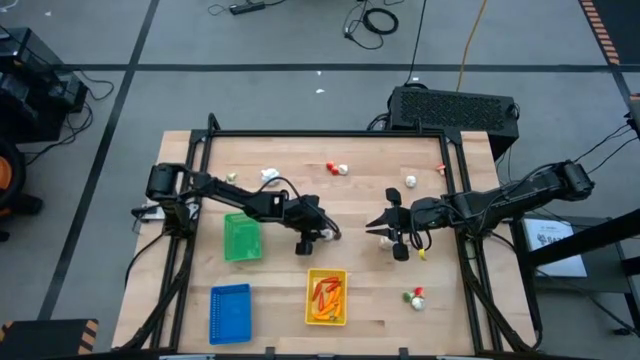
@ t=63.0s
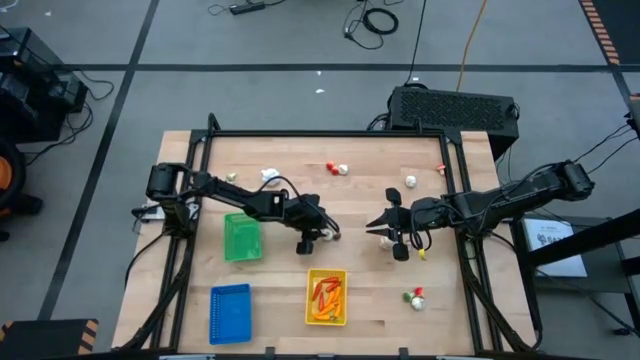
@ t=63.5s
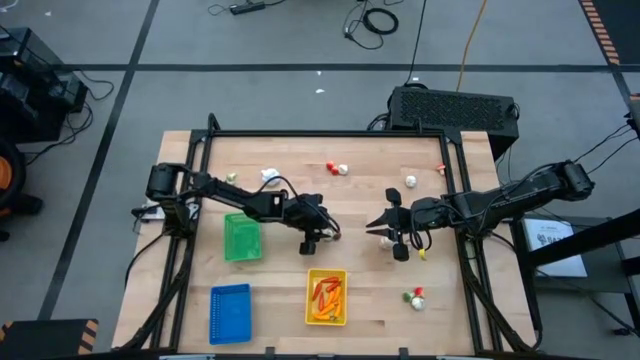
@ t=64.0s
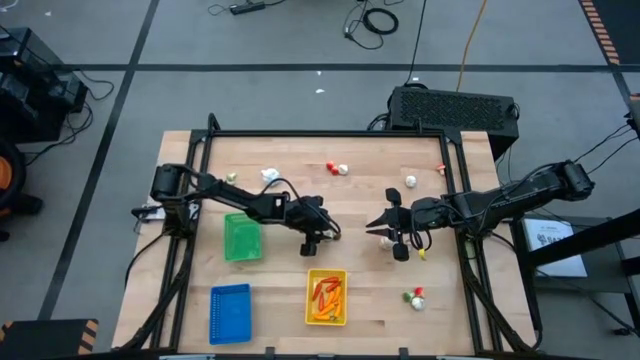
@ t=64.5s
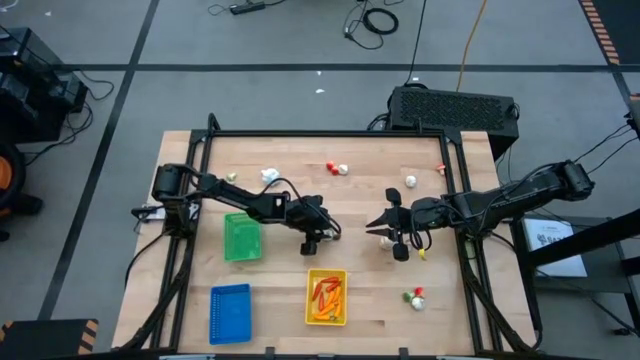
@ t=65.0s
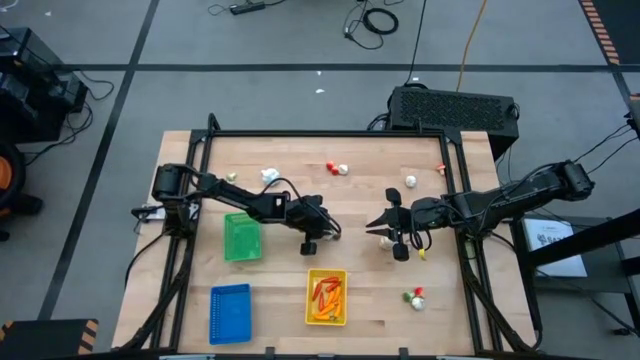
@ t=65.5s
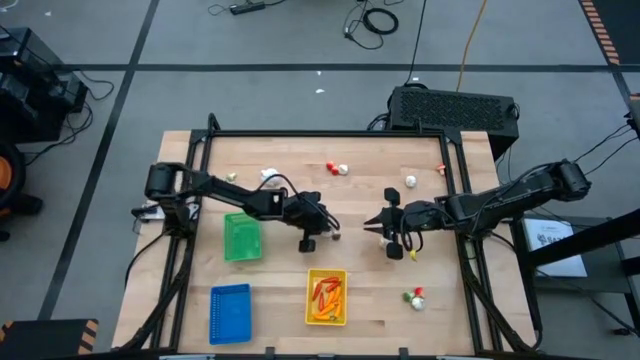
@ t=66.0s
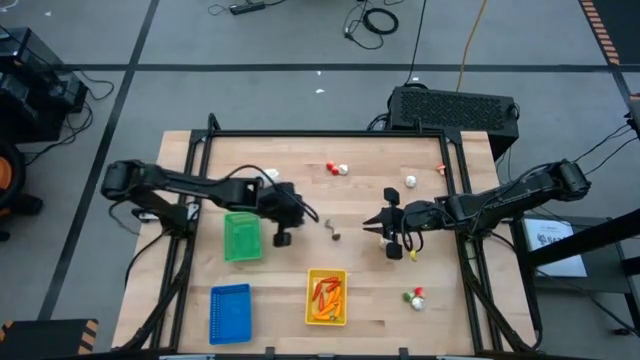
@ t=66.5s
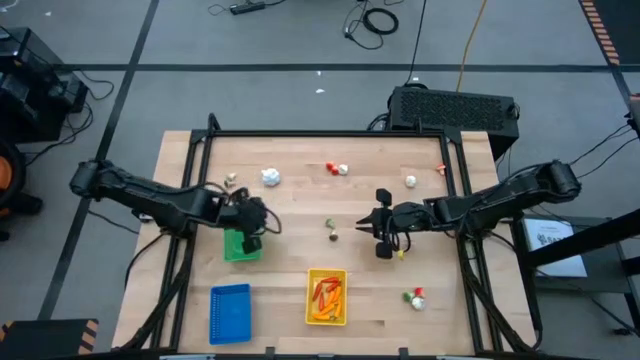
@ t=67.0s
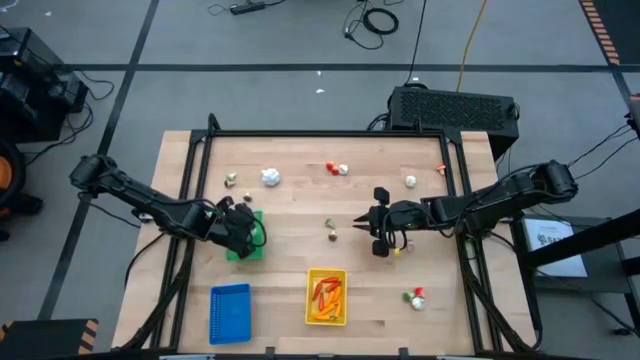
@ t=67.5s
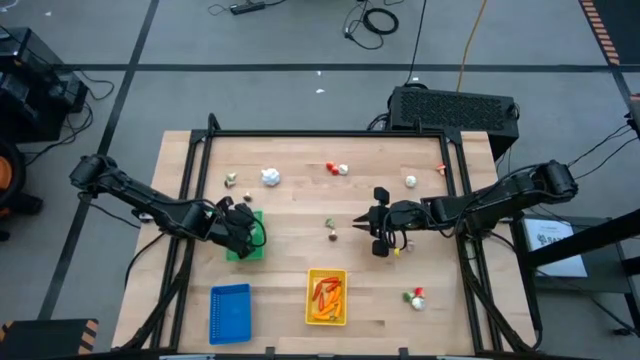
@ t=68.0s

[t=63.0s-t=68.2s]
Task: Sort produce into baskets
Put the garlic into the green basket

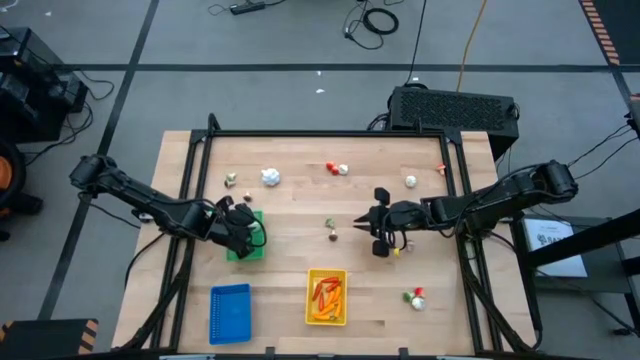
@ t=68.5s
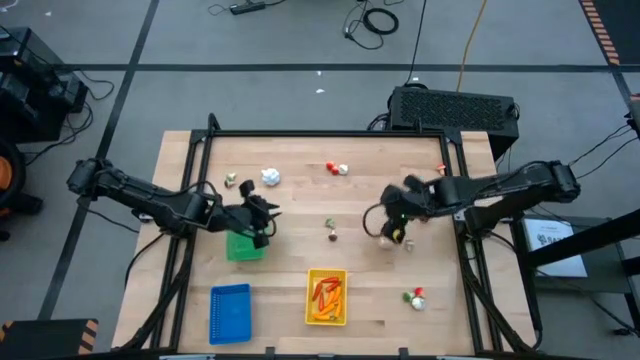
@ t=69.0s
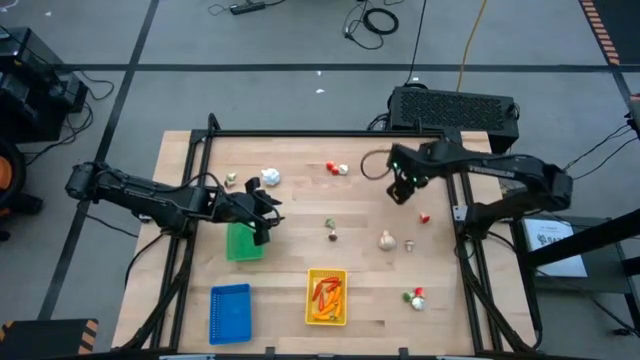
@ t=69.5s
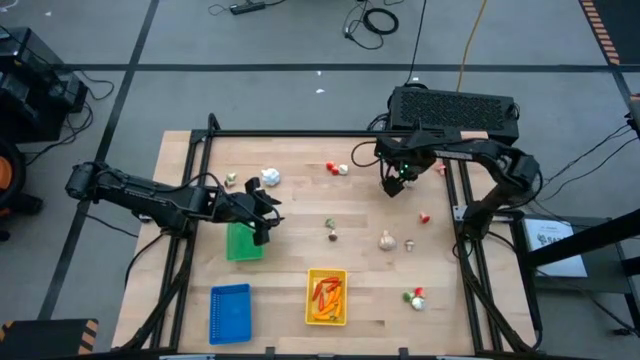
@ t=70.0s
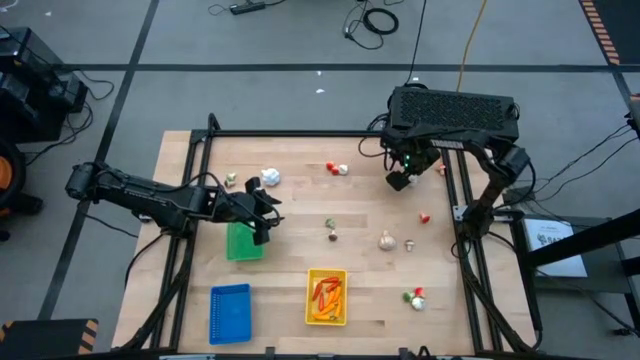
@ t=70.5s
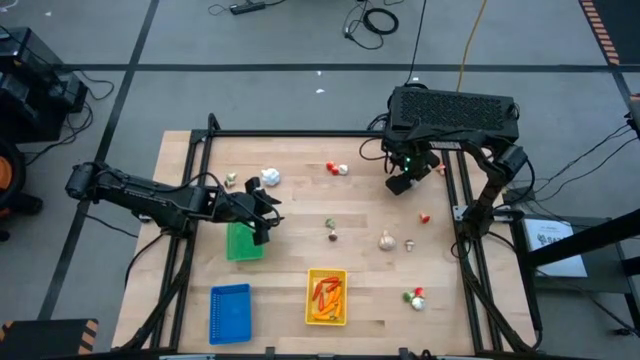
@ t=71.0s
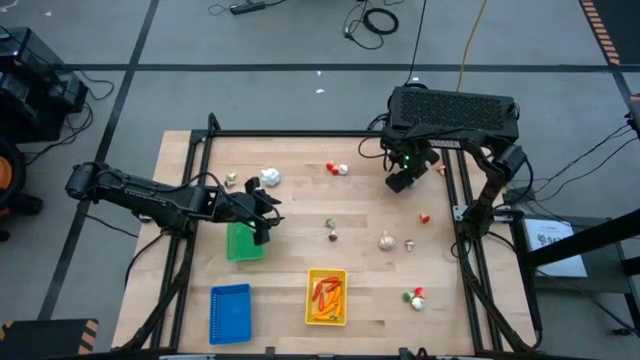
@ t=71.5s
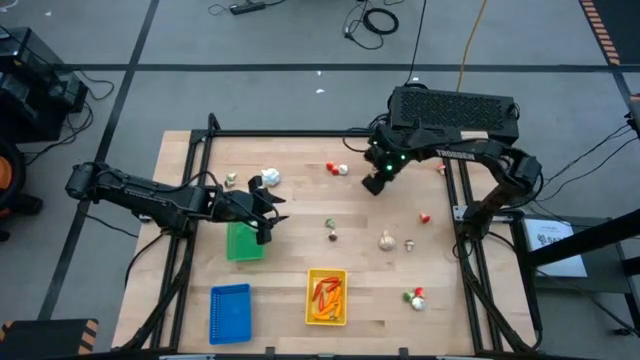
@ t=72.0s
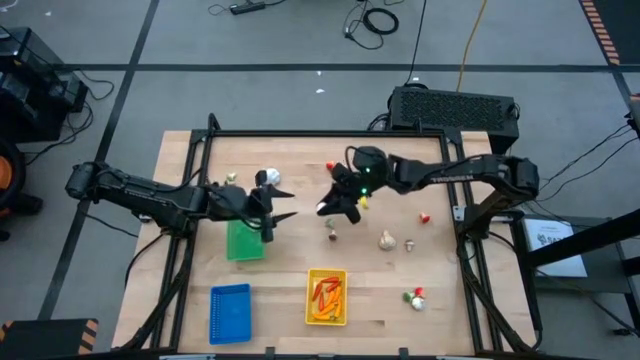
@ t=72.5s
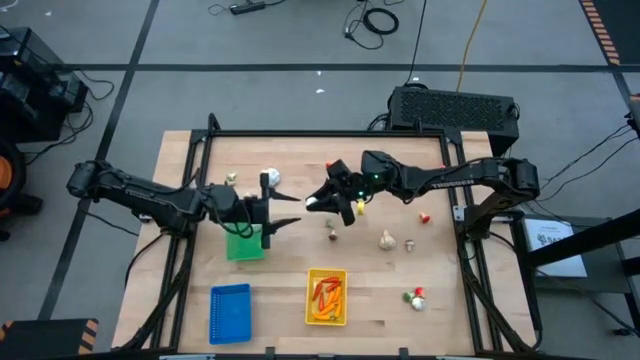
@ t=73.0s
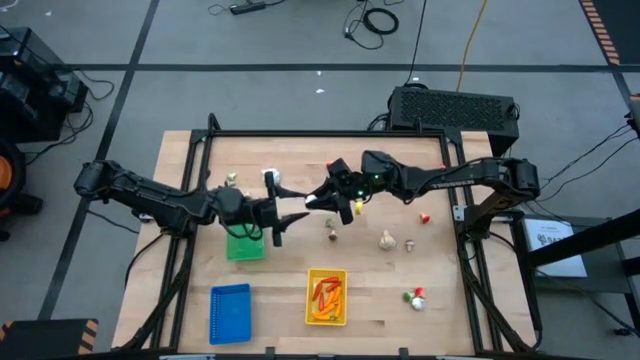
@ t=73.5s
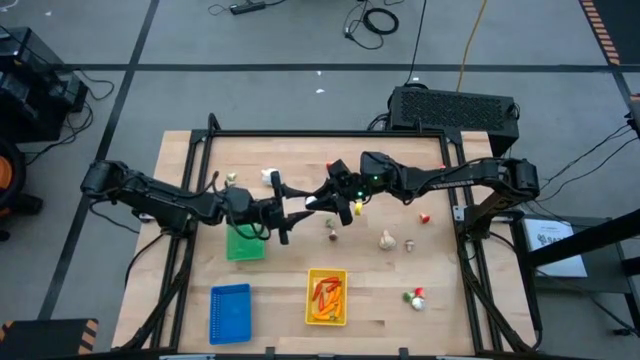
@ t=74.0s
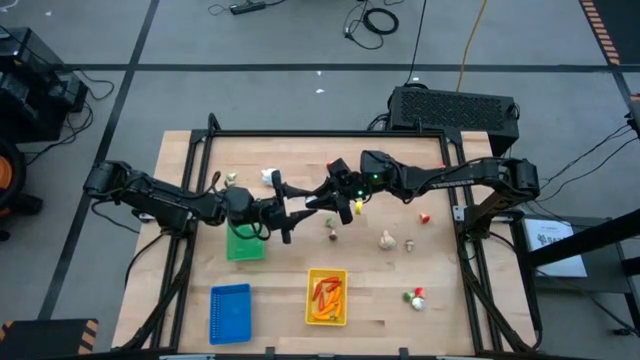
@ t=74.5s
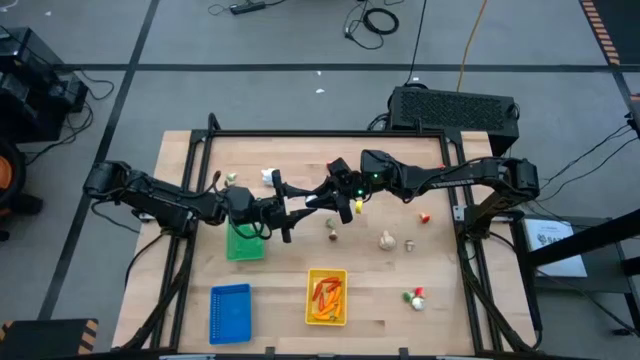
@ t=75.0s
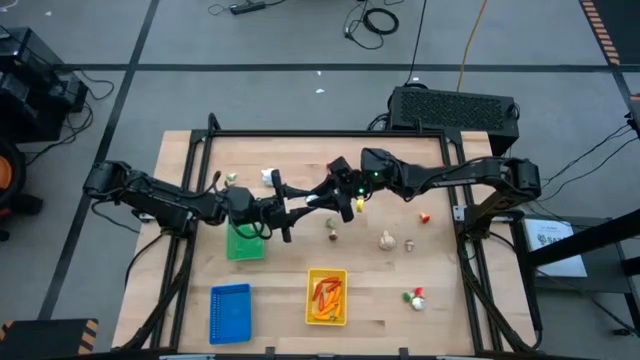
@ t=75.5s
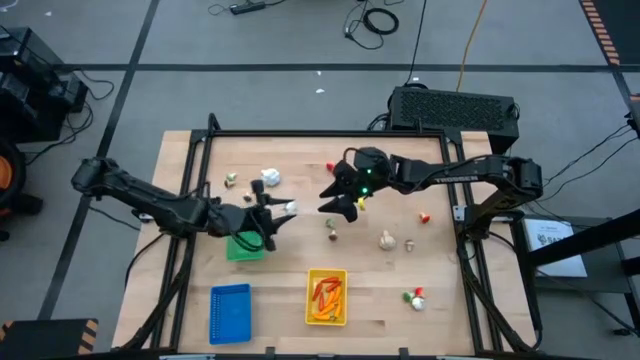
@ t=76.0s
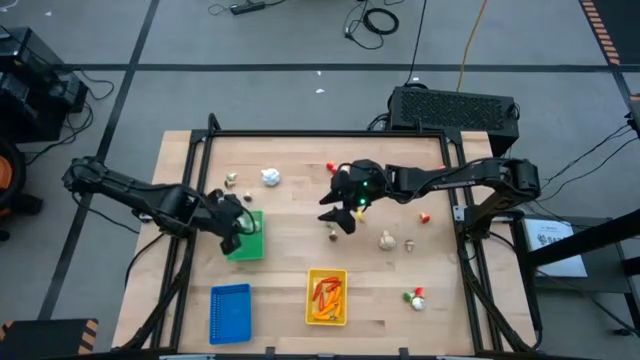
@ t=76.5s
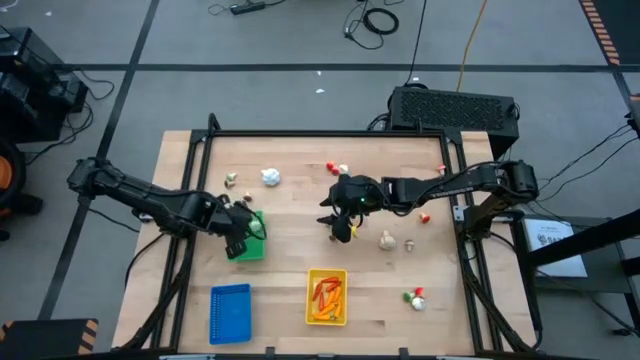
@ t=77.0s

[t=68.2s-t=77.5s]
Put the garlic into the green basket

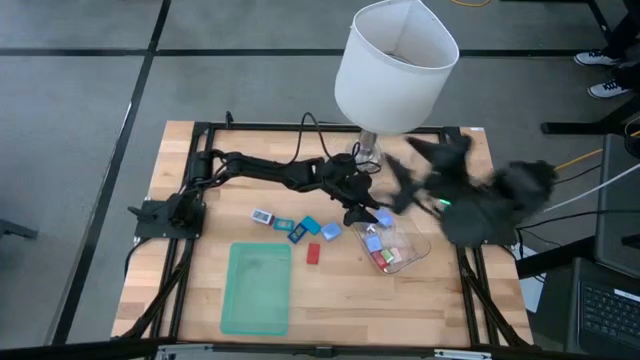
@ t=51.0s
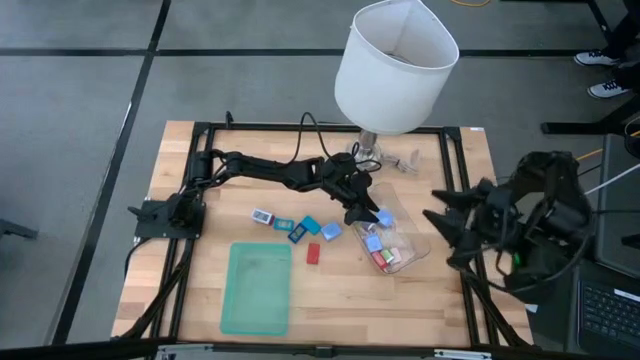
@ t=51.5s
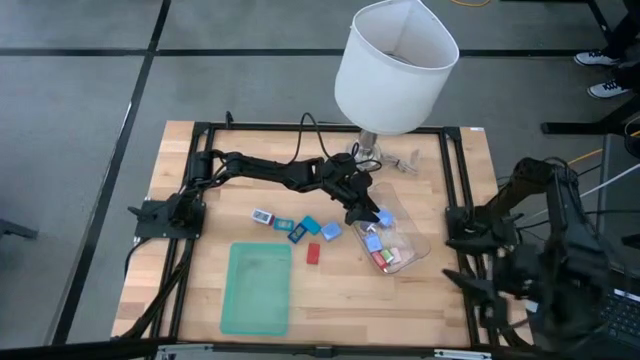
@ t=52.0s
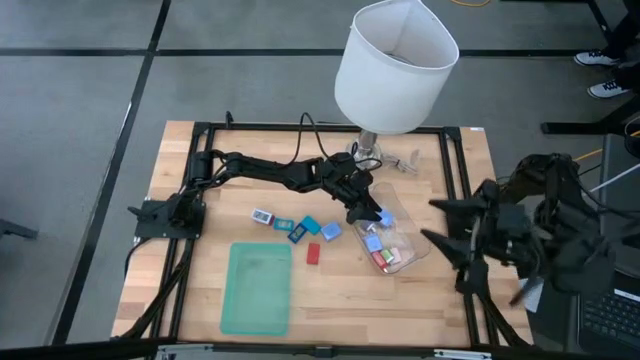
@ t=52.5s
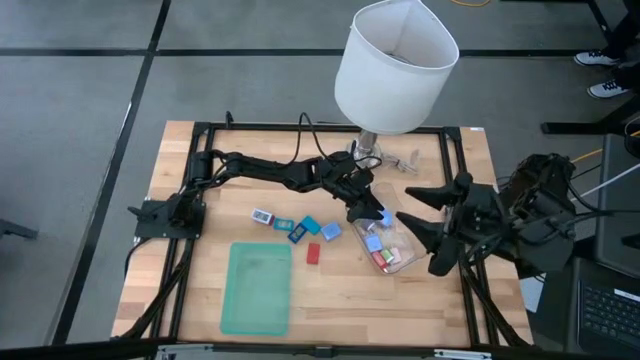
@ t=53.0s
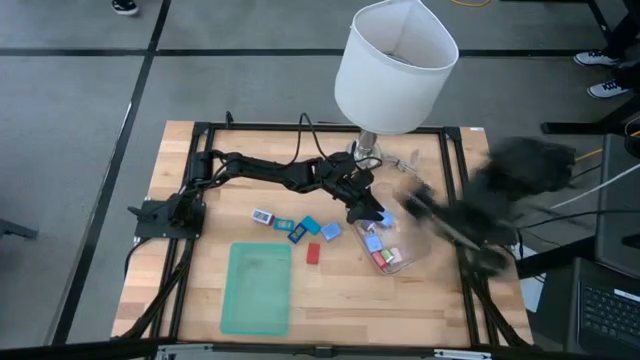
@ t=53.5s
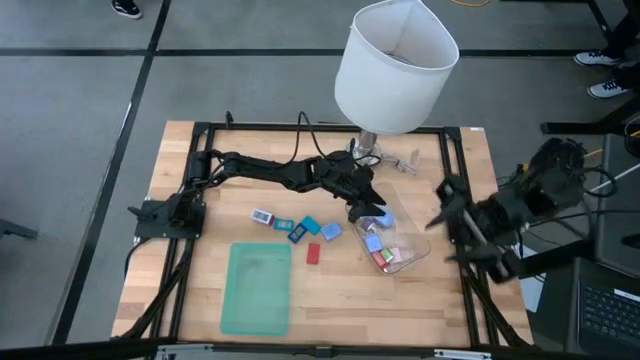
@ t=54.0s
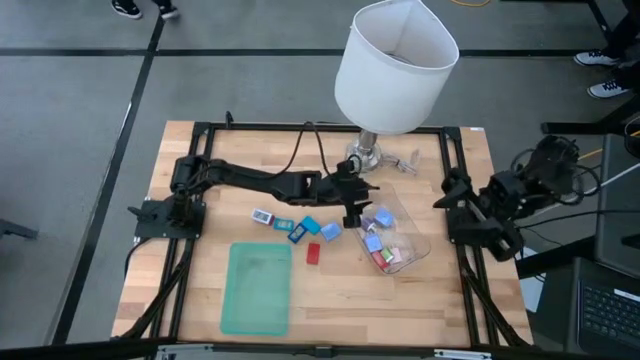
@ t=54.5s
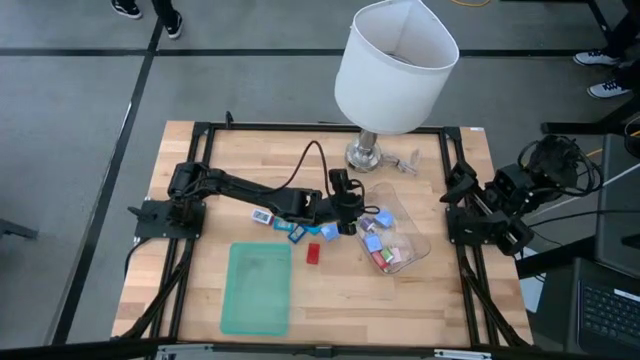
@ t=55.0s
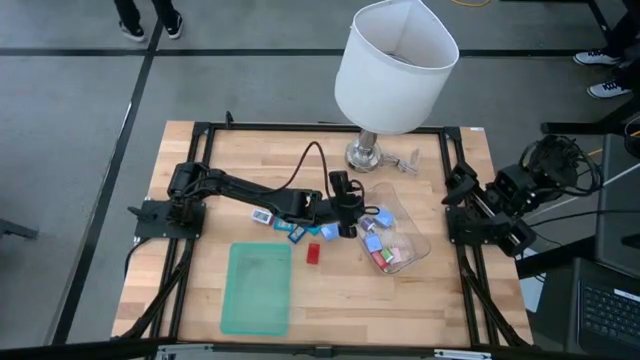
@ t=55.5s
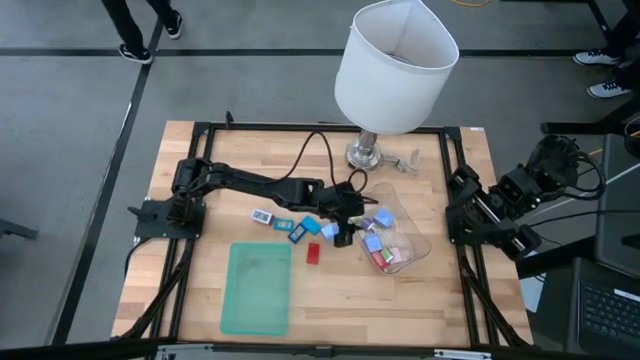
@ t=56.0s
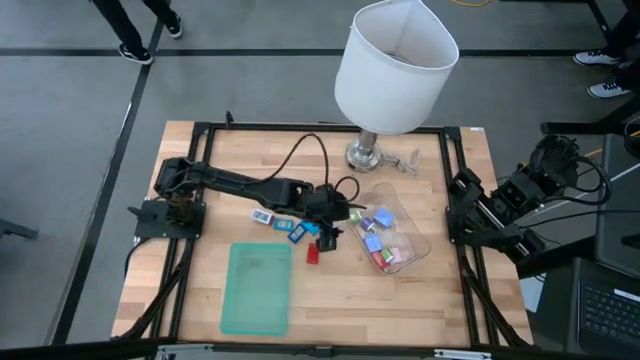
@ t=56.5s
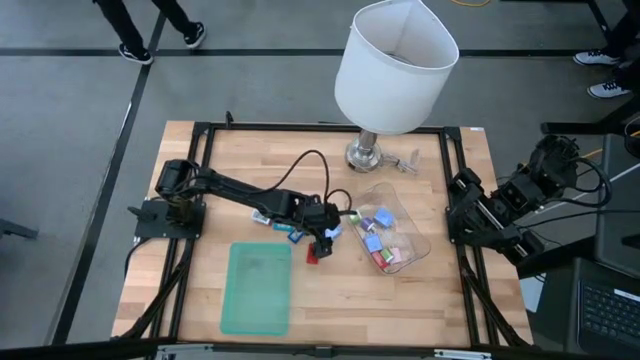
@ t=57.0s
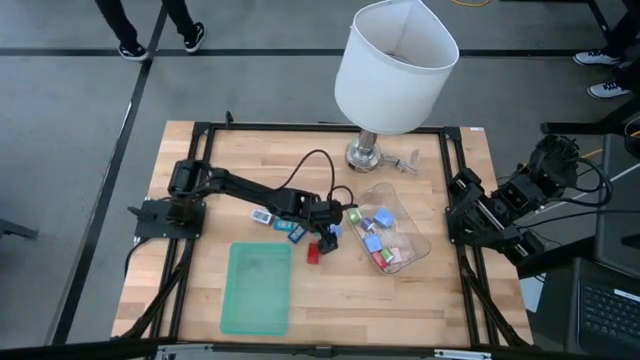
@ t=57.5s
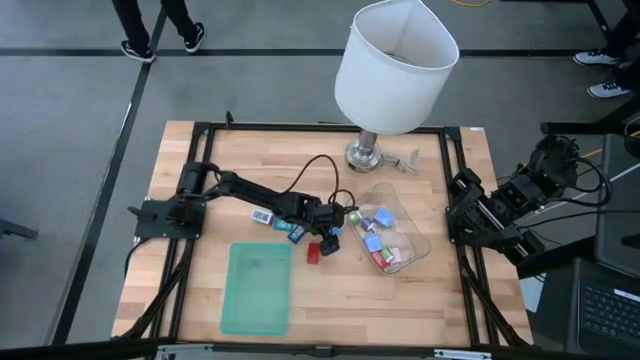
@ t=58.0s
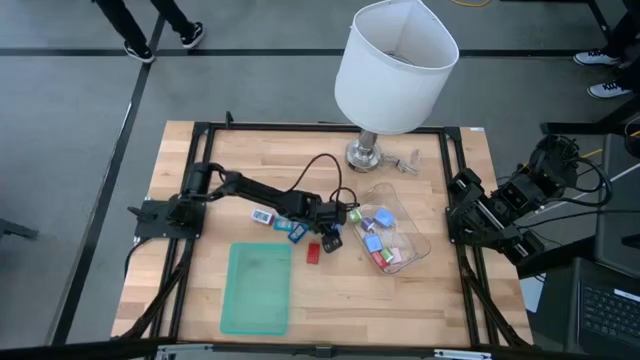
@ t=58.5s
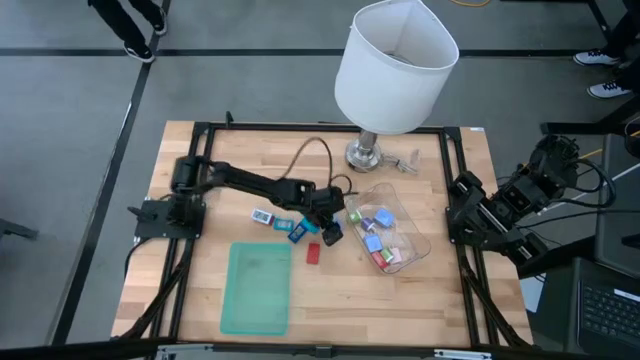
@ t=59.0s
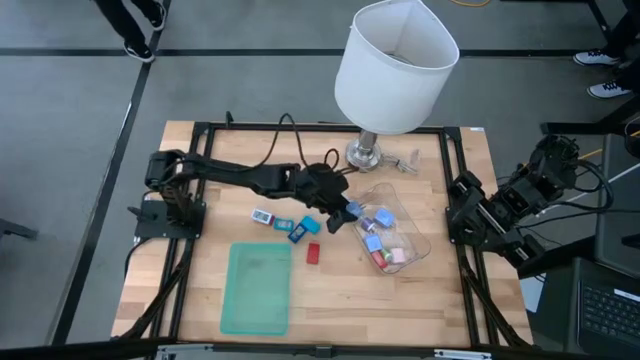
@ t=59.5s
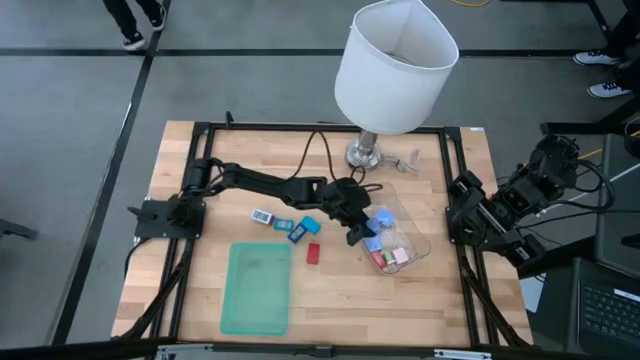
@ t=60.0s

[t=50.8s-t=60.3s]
Task: Pick & Place Office items
Put the light blue charger adapter into the transparent bin
